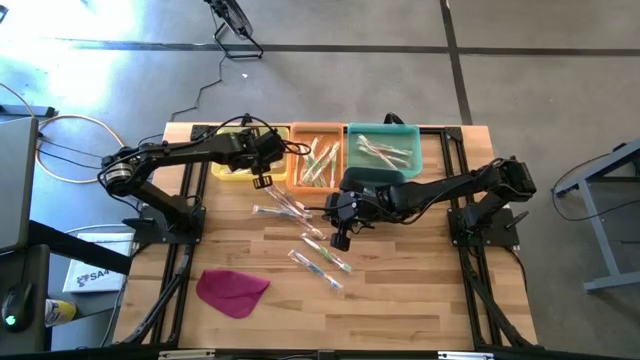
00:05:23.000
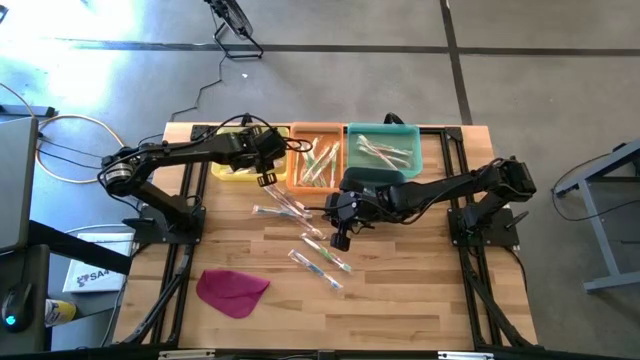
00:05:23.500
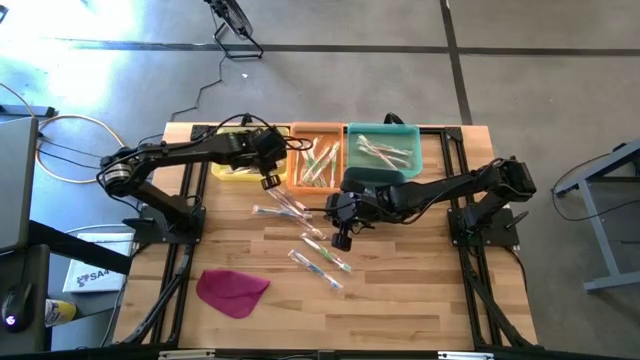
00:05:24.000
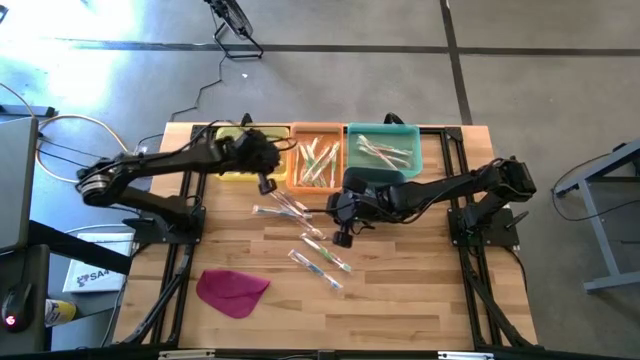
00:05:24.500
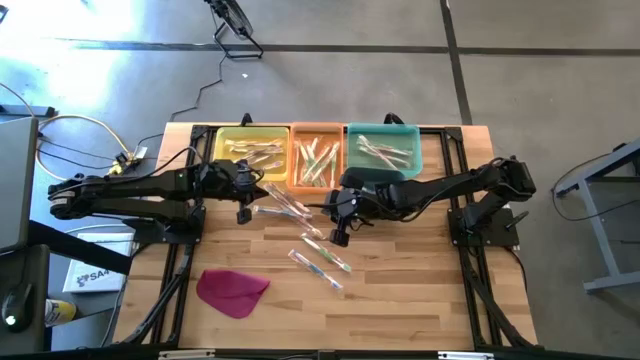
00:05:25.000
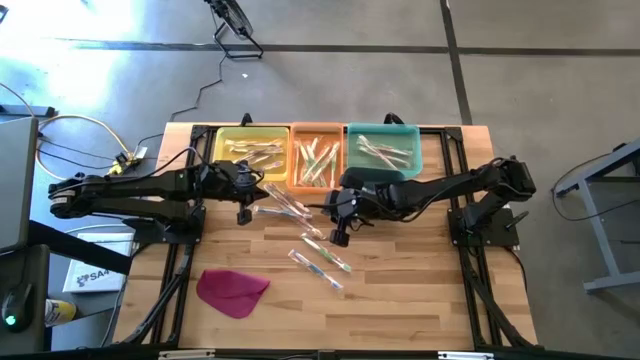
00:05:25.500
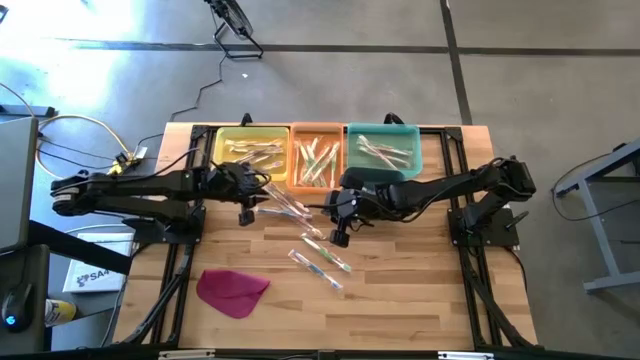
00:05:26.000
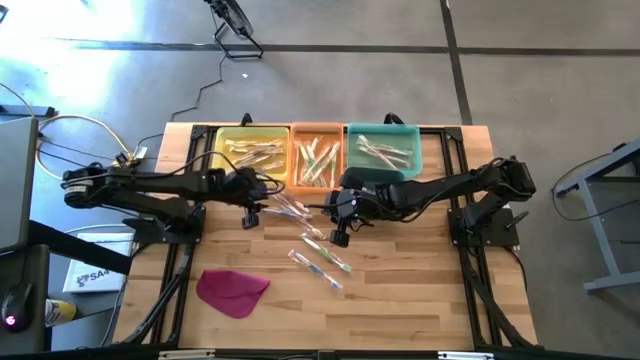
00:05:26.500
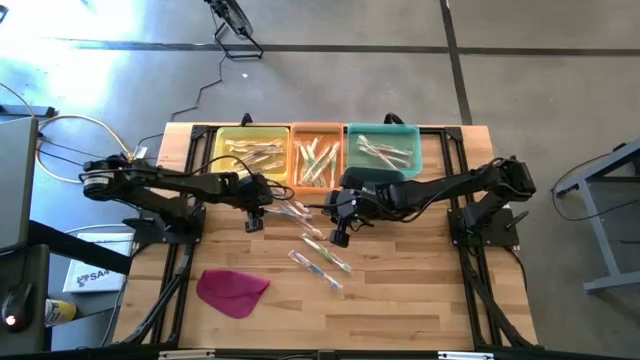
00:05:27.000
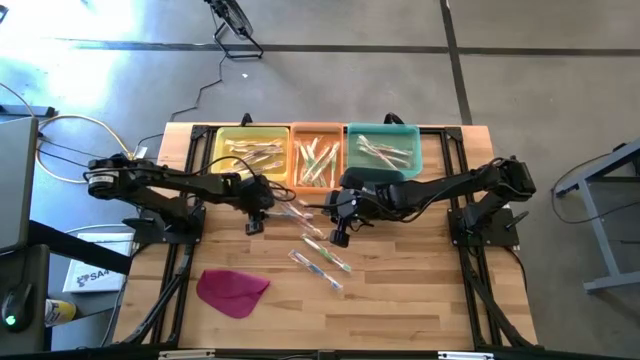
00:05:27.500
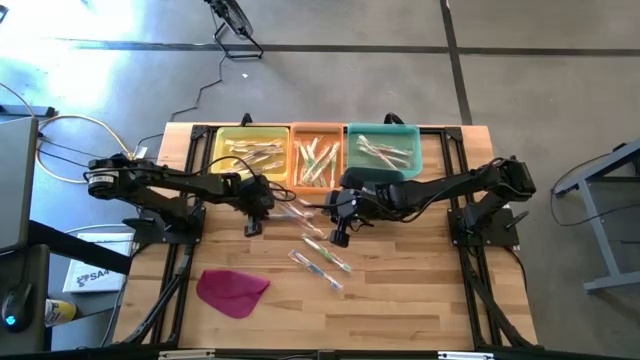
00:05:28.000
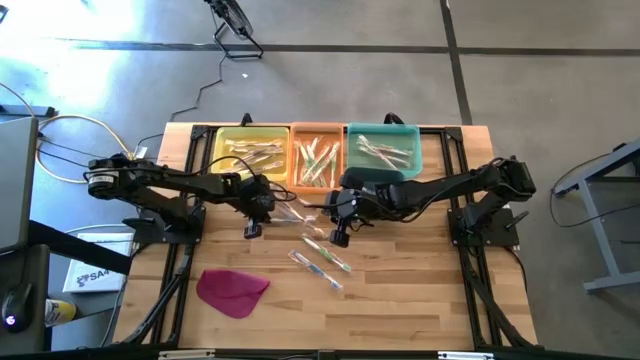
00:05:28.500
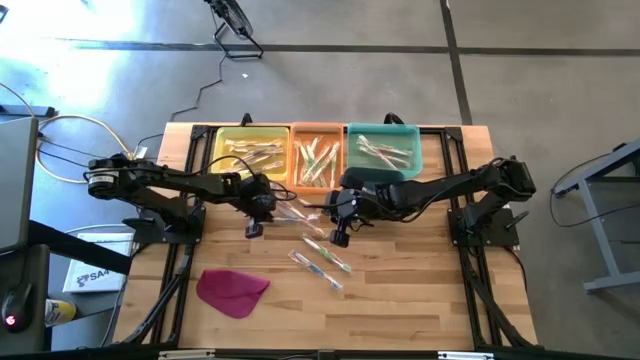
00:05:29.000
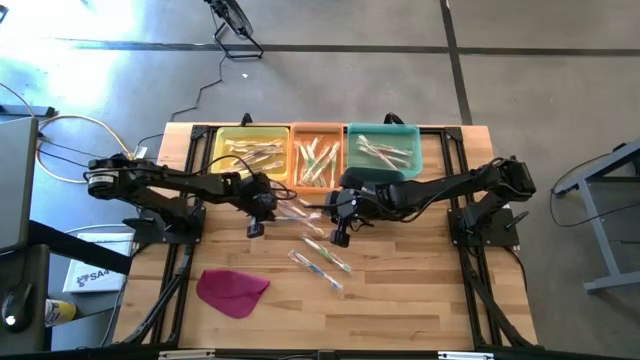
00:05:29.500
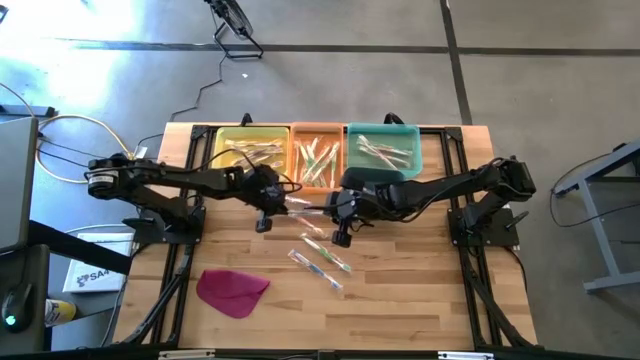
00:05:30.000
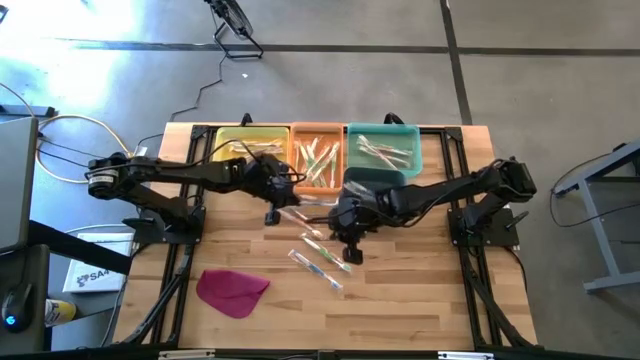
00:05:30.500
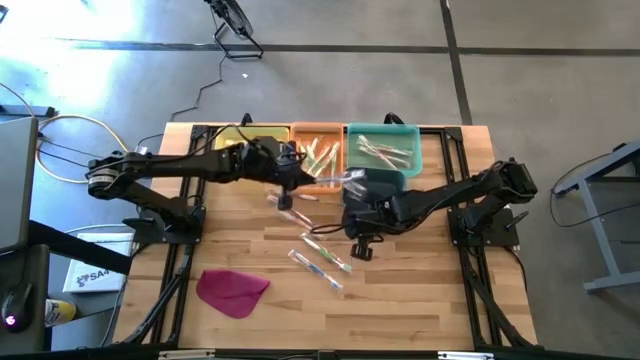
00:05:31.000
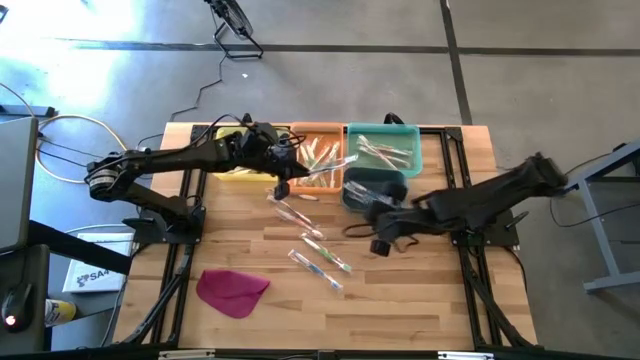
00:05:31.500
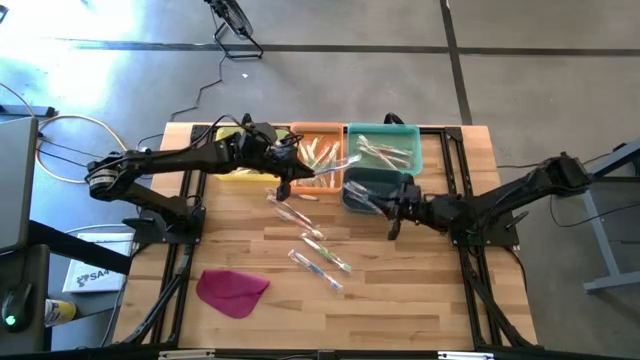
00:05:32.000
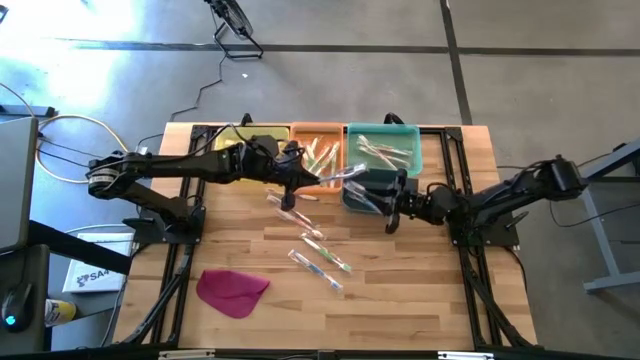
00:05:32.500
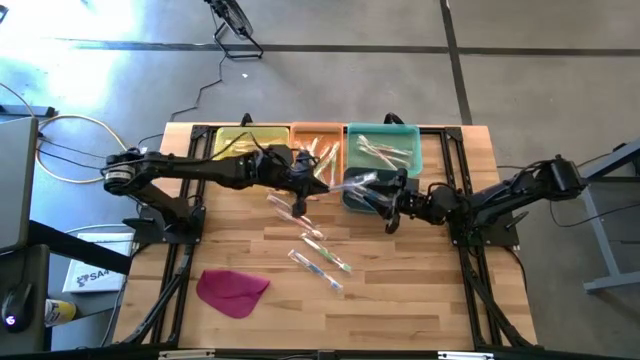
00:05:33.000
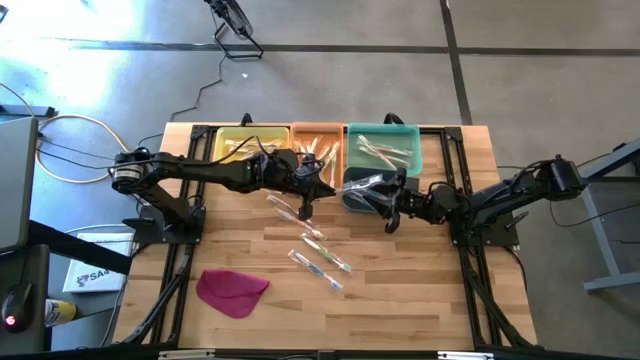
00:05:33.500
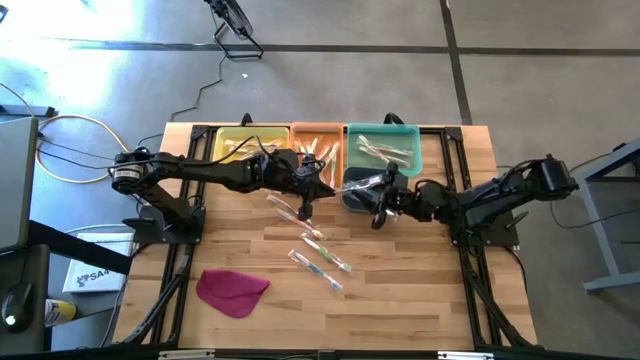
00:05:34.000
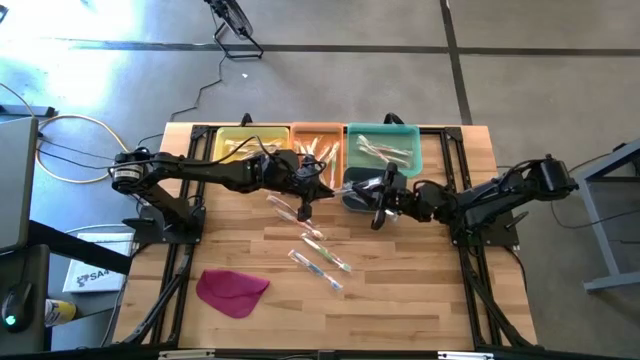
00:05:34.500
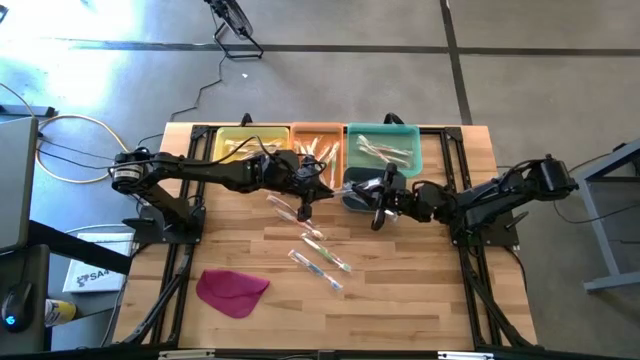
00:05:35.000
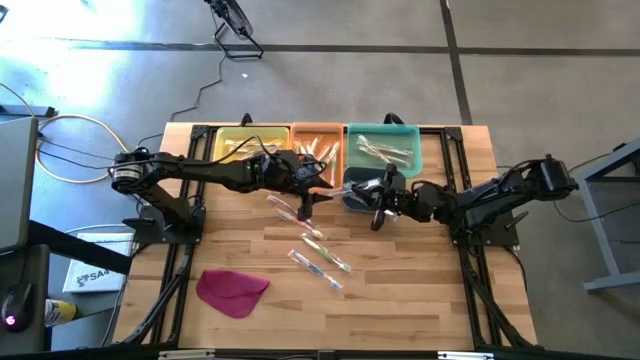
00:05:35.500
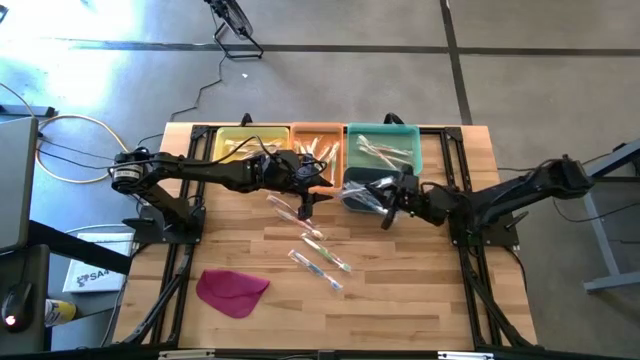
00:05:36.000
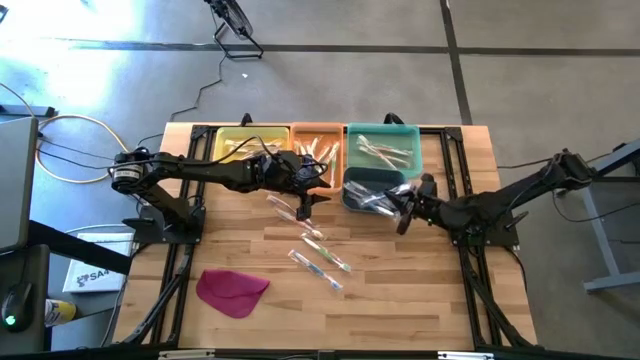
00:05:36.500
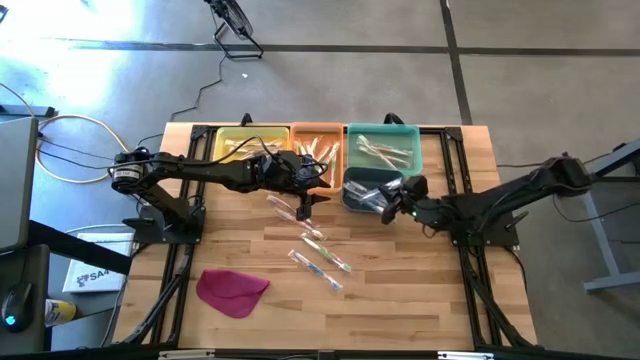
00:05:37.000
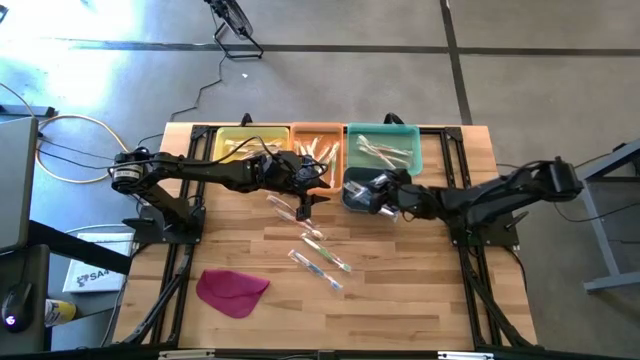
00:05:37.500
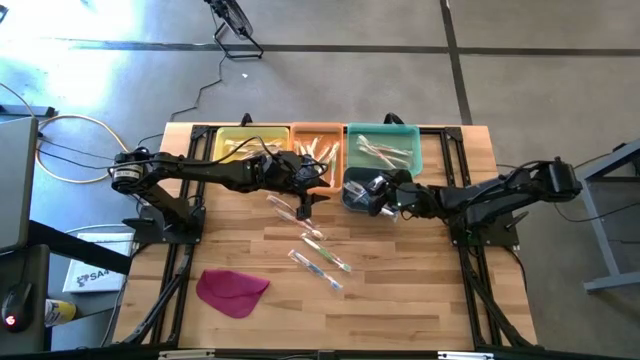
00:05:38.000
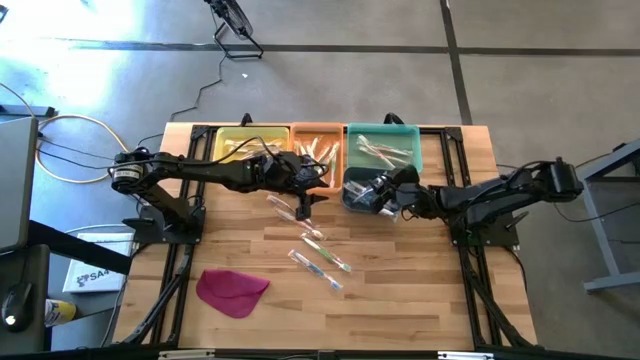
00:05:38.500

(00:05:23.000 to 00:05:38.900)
Task: Pick & Place Toothbrushes
Put the blue toothbrush into the dark blue bin

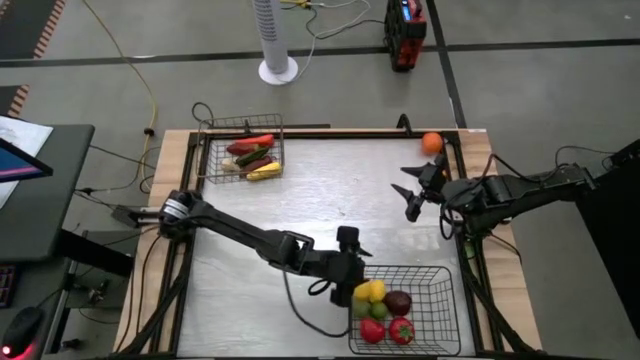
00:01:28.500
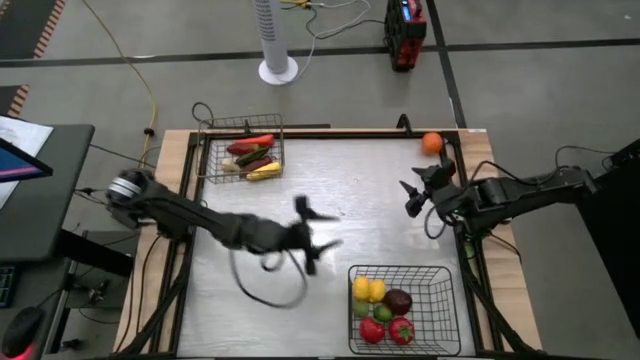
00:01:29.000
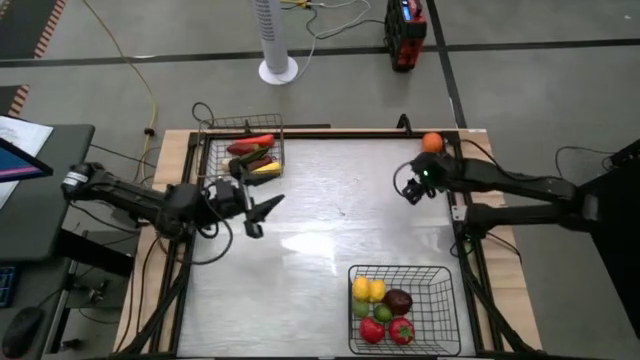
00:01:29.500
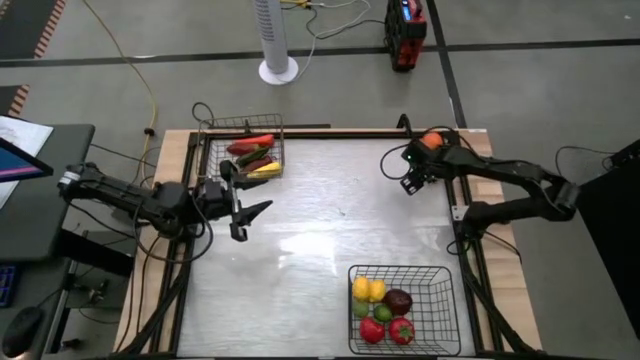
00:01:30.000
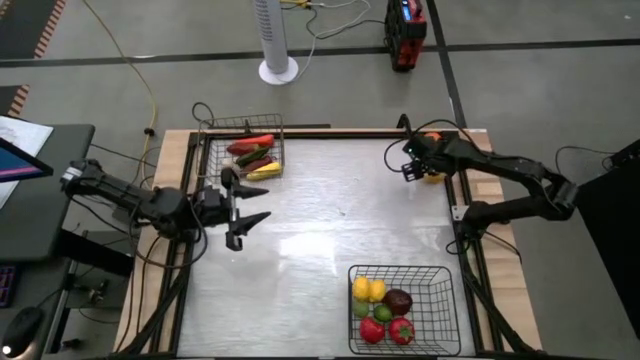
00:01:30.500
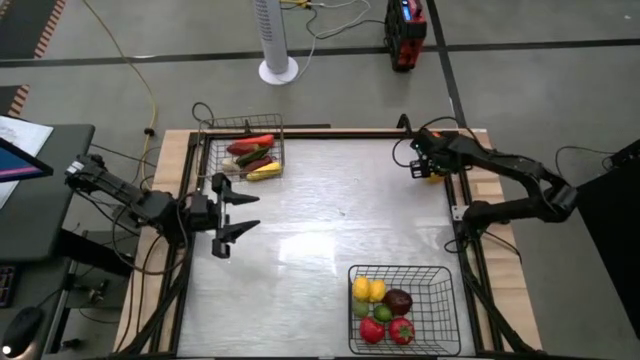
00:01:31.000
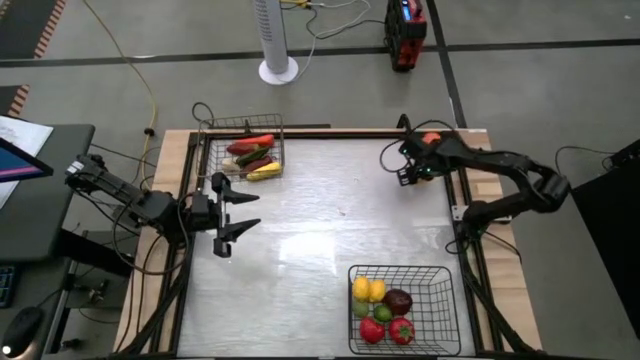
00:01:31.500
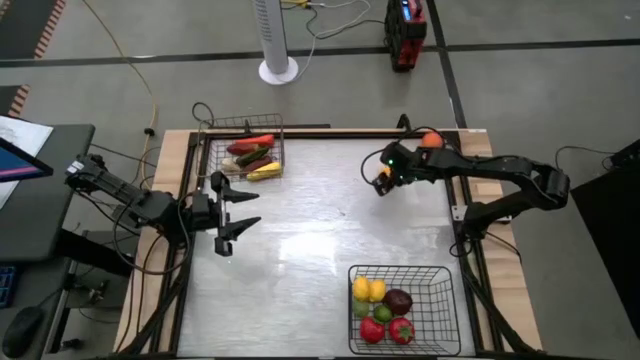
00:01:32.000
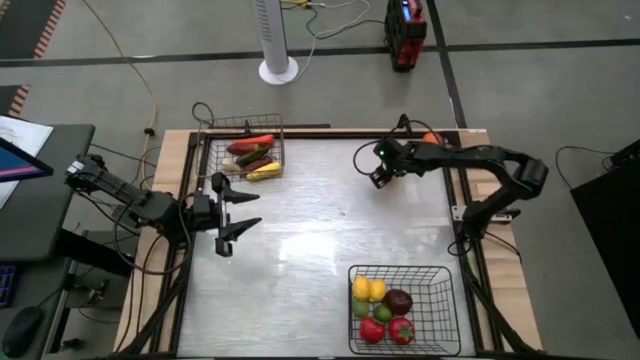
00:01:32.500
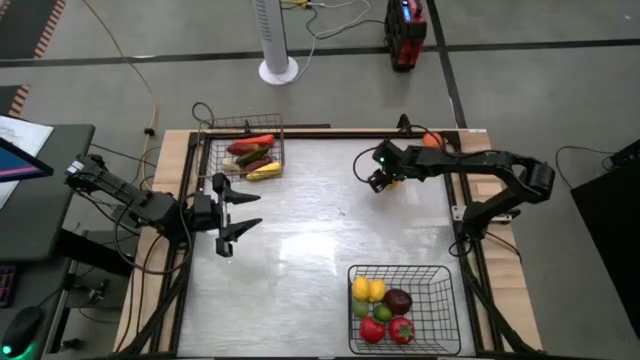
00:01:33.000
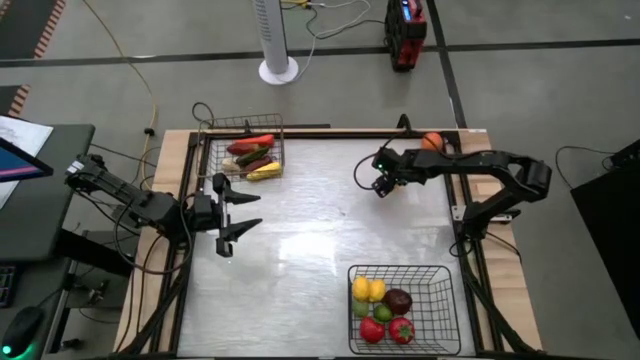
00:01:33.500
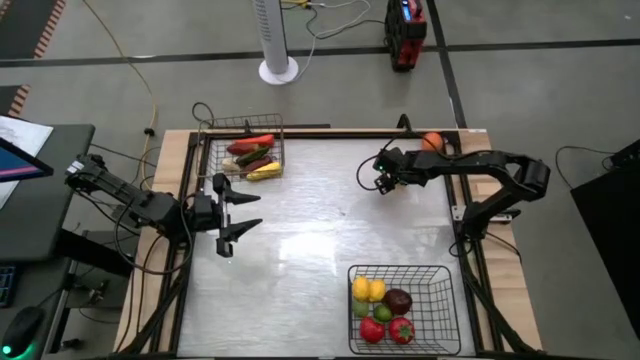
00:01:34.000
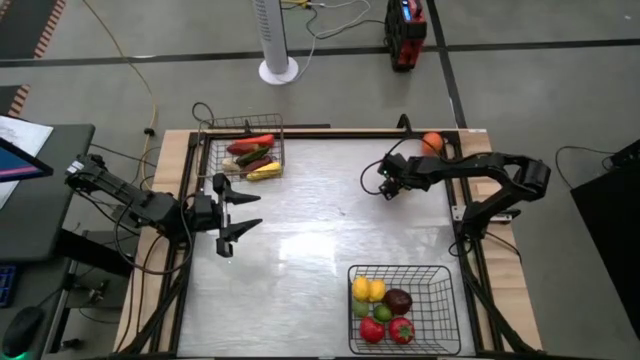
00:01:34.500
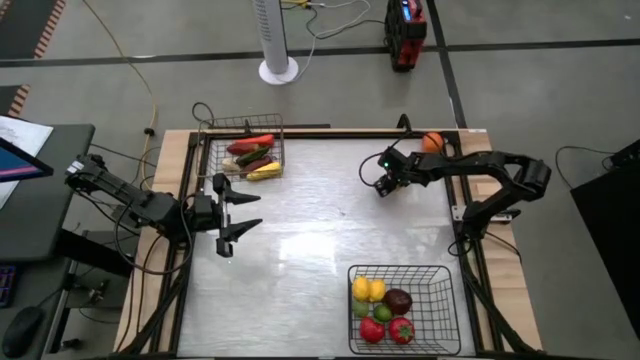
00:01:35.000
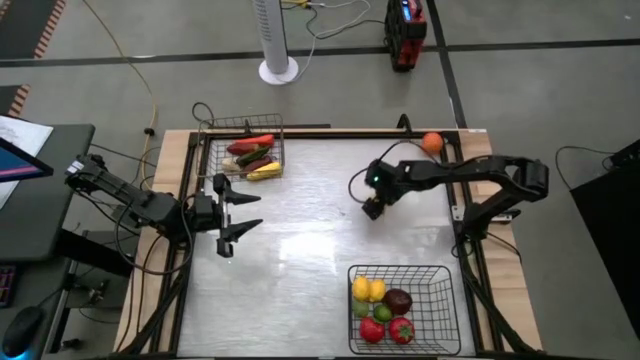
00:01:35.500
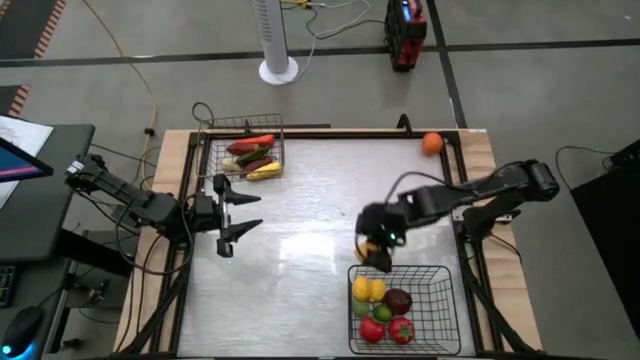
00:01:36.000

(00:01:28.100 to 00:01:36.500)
Task: Sort produce into baskets
Put the lemon into the bottom wire basket
